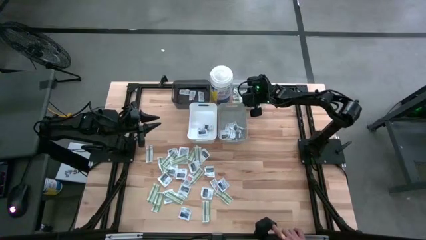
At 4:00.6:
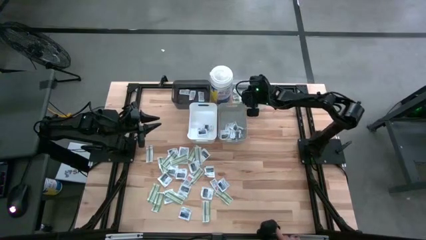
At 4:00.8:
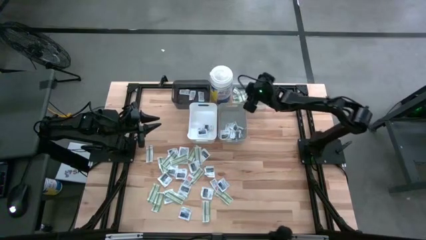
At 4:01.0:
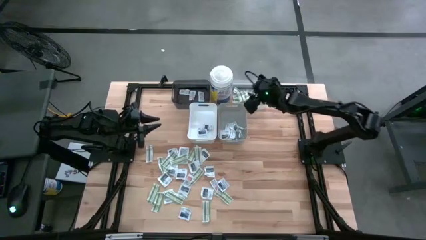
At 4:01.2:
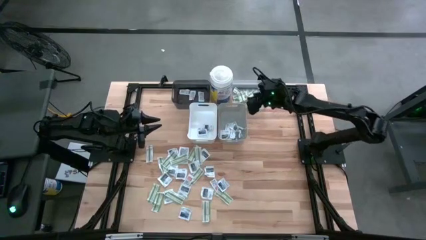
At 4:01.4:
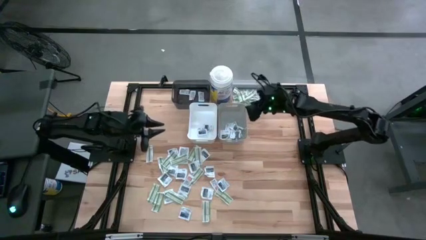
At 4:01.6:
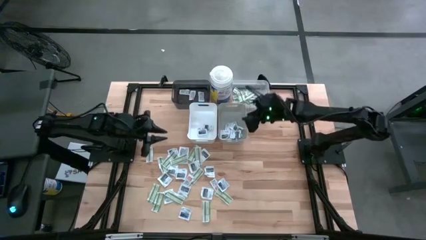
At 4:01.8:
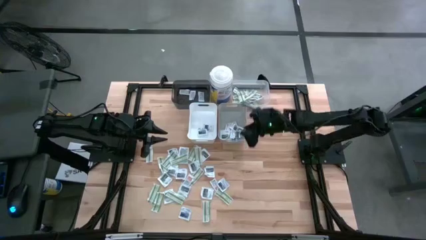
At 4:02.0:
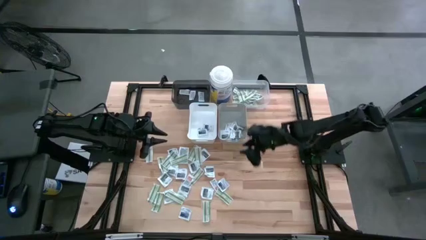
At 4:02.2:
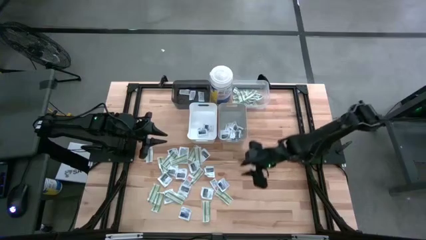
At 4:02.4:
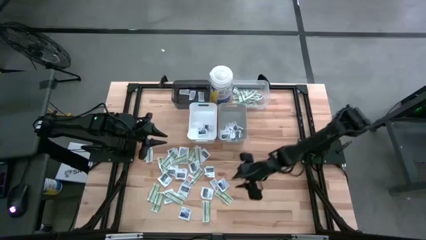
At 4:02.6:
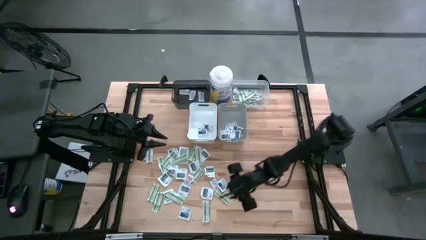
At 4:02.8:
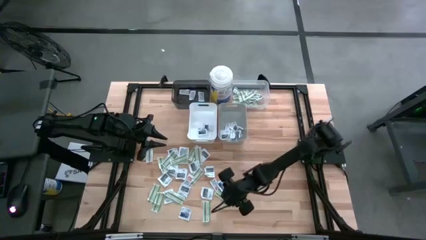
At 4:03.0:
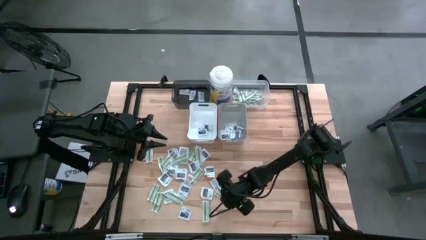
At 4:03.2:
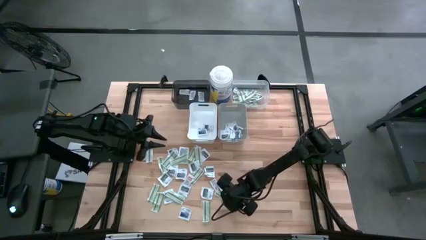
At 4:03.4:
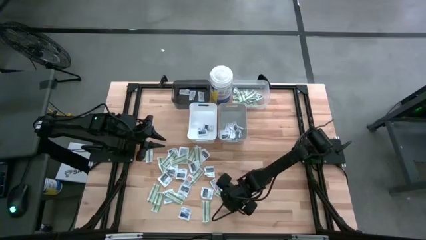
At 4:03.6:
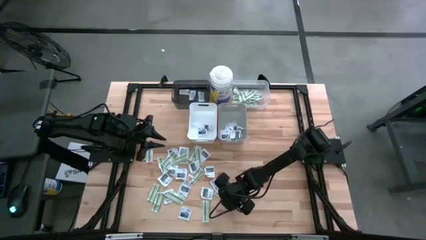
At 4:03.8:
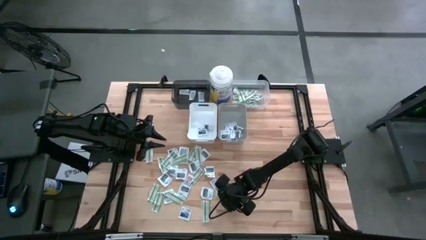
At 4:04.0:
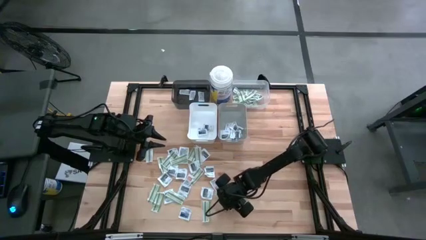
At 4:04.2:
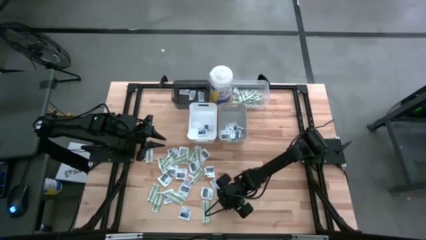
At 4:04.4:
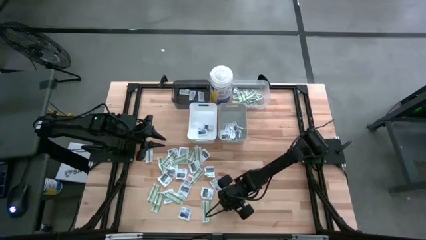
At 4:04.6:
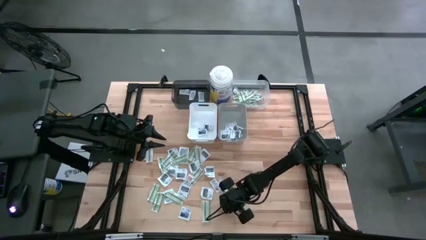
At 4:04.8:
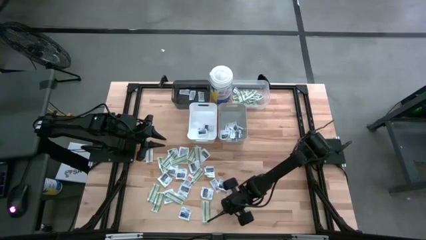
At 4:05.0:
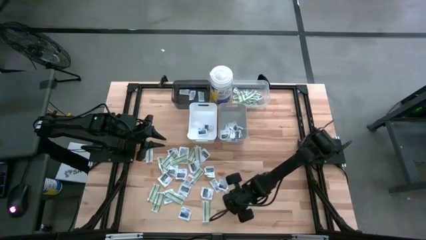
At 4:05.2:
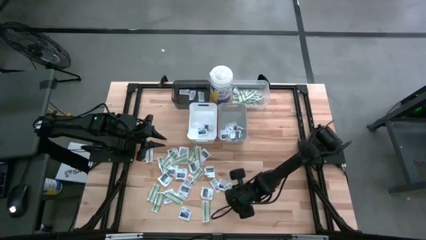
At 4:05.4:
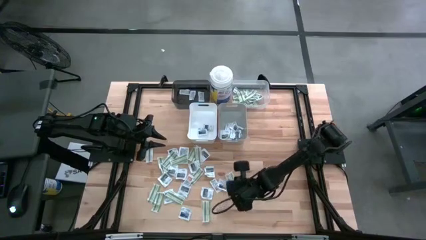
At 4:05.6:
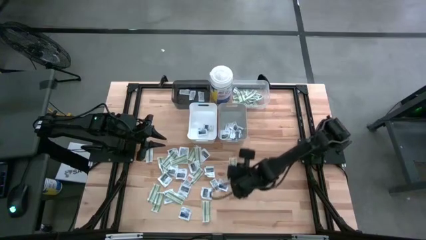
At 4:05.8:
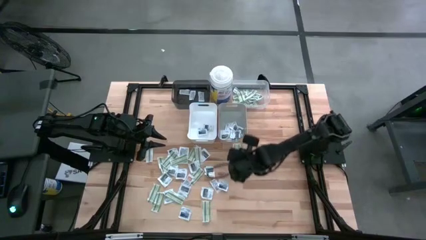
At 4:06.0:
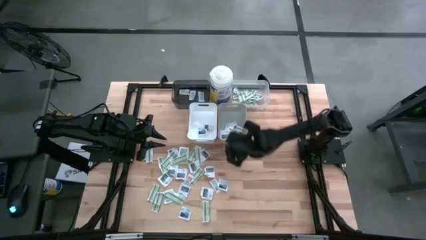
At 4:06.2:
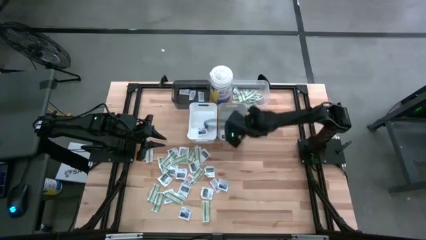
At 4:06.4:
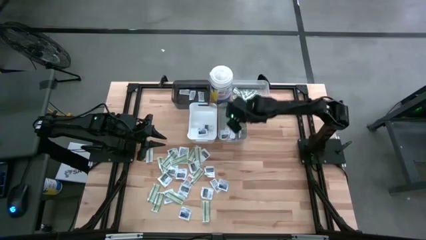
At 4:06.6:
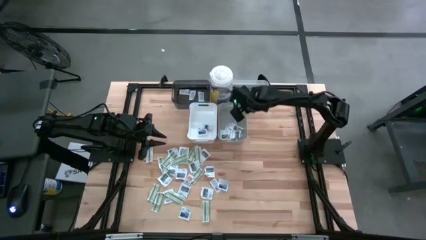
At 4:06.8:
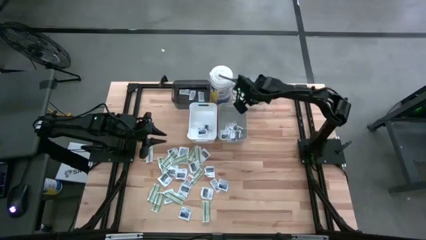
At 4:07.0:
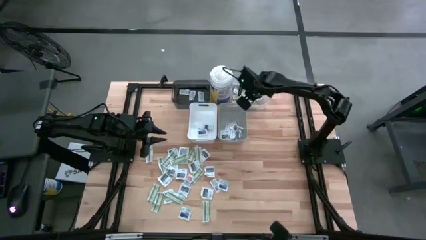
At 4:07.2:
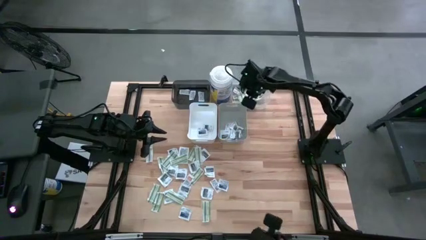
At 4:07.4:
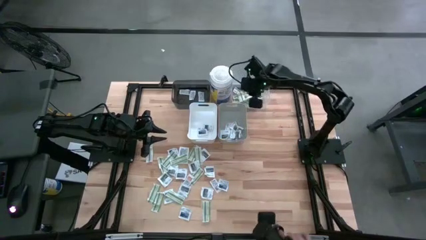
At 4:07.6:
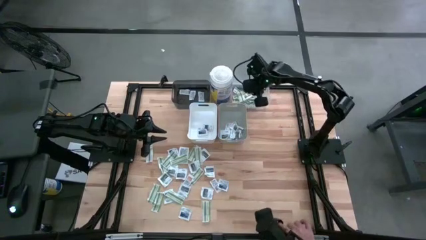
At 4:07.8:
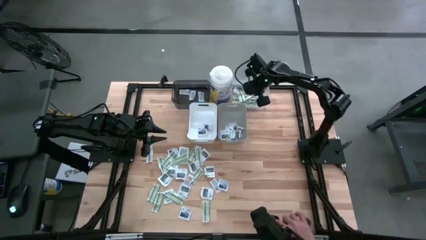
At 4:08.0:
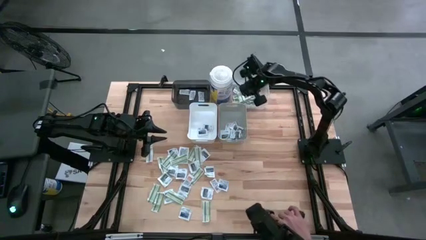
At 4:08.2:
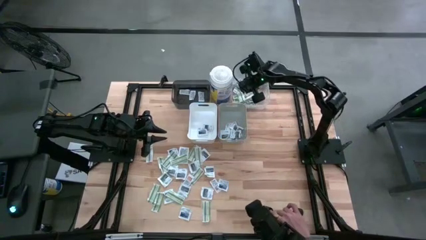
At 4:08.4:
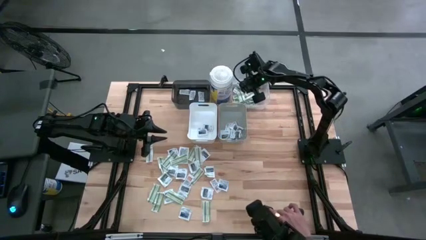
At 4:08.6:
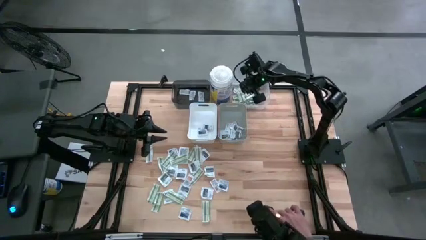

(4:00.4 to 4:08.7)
Task: Pick & Place First Aid Supplies
Put the band aid into the transparent bin

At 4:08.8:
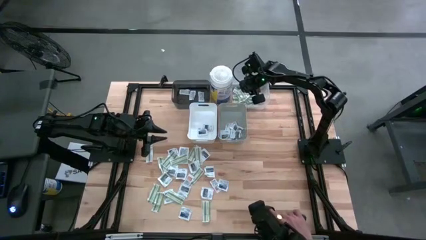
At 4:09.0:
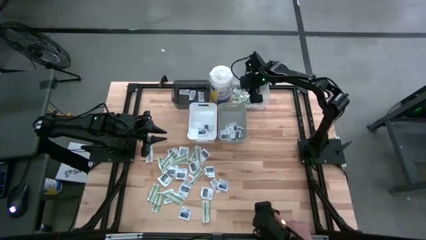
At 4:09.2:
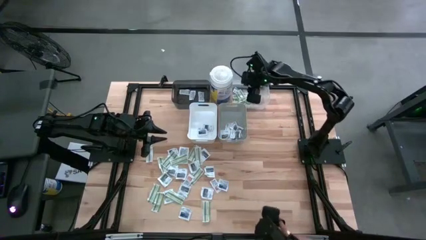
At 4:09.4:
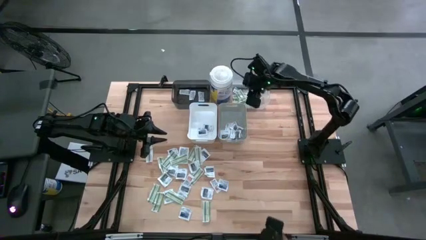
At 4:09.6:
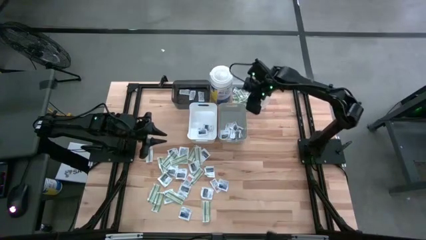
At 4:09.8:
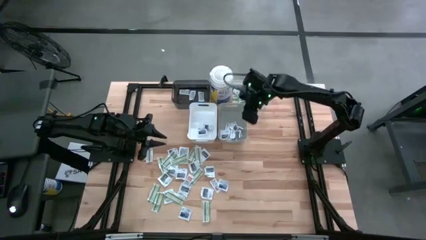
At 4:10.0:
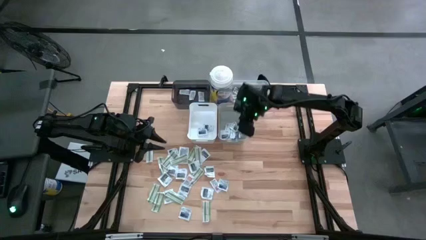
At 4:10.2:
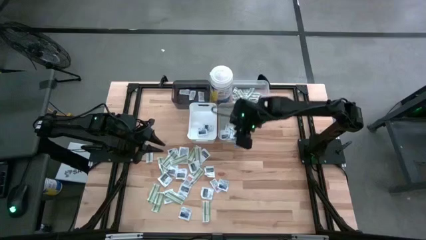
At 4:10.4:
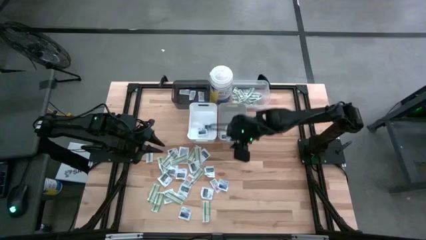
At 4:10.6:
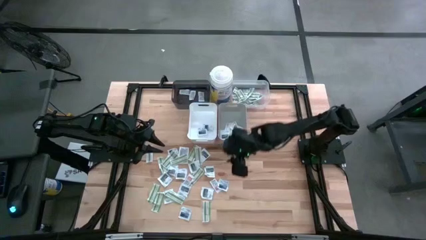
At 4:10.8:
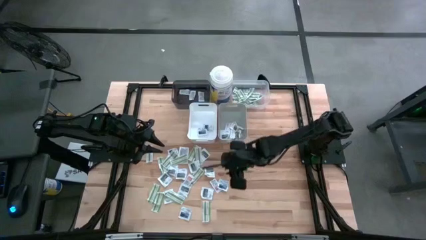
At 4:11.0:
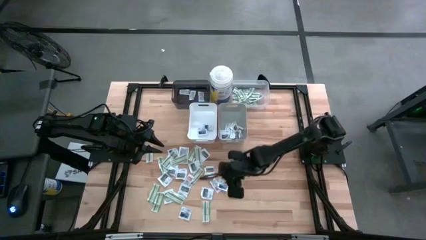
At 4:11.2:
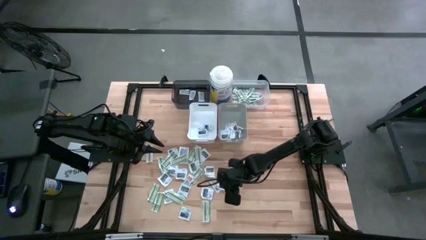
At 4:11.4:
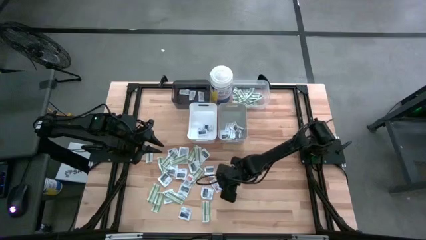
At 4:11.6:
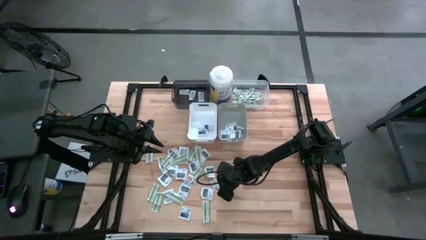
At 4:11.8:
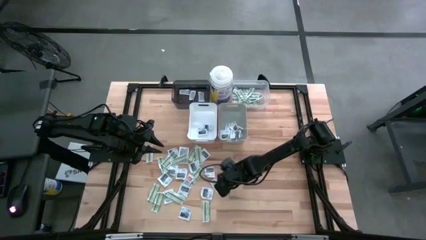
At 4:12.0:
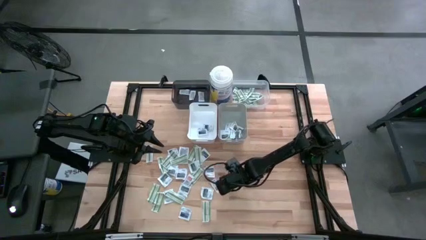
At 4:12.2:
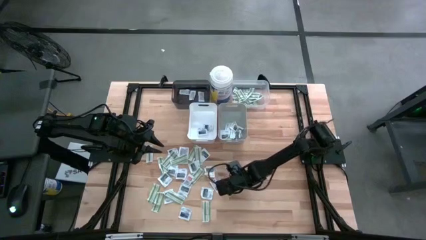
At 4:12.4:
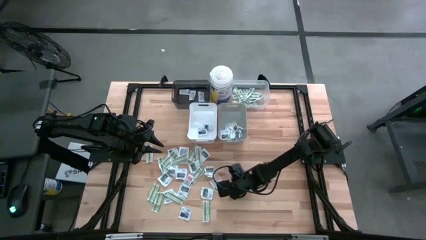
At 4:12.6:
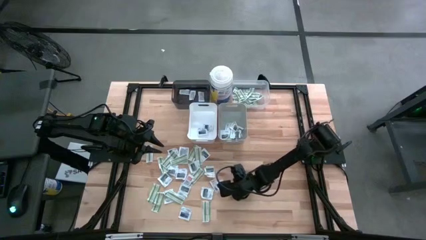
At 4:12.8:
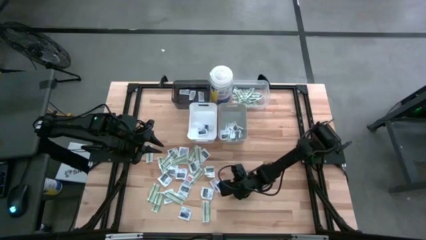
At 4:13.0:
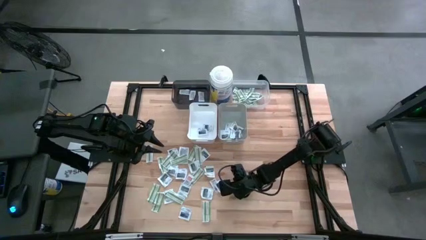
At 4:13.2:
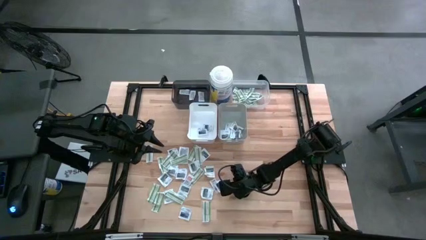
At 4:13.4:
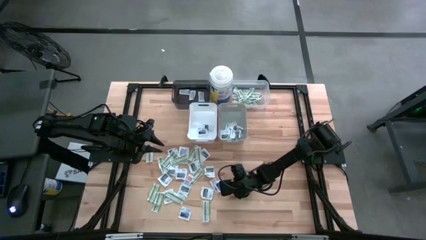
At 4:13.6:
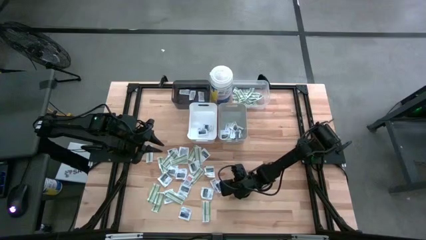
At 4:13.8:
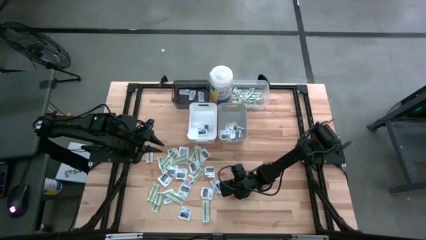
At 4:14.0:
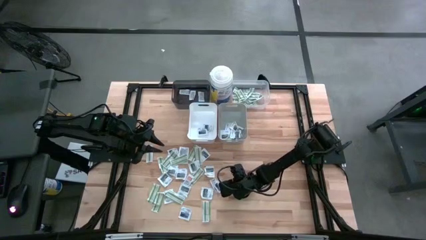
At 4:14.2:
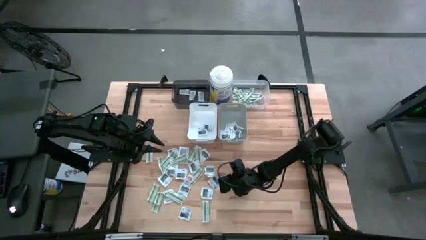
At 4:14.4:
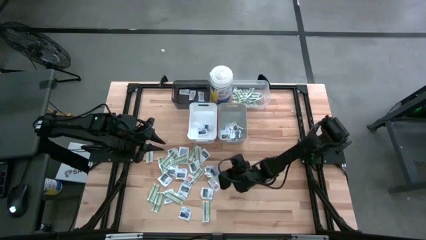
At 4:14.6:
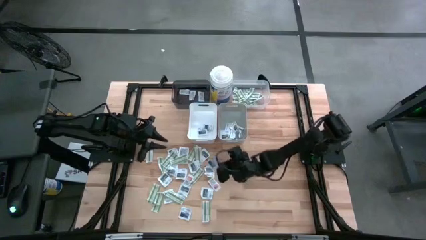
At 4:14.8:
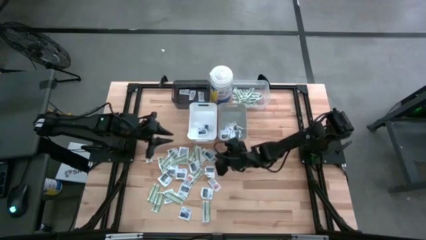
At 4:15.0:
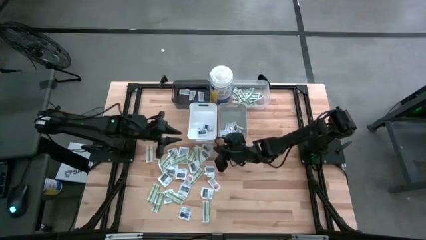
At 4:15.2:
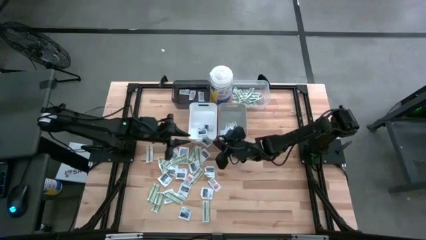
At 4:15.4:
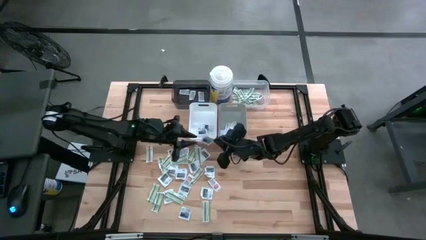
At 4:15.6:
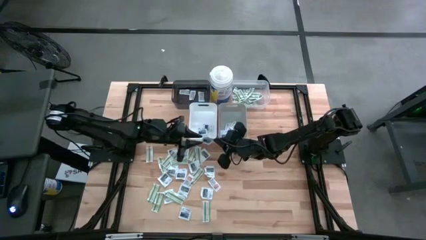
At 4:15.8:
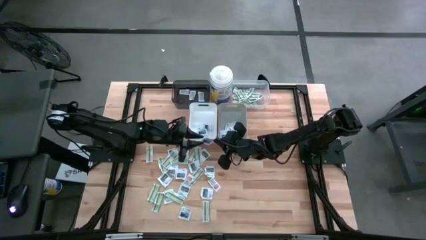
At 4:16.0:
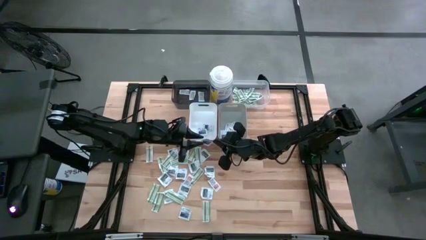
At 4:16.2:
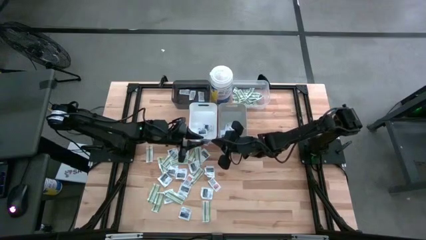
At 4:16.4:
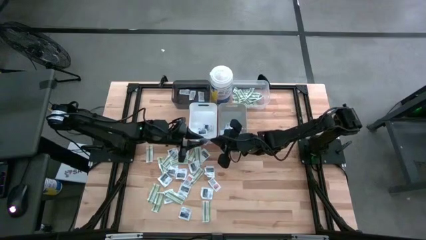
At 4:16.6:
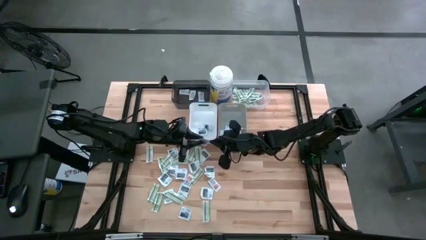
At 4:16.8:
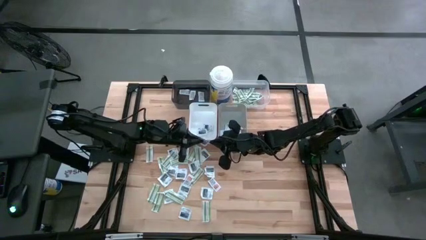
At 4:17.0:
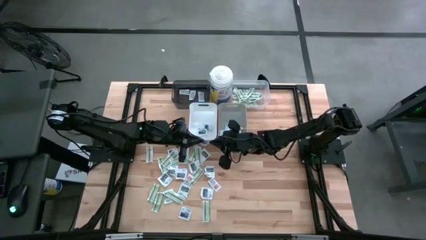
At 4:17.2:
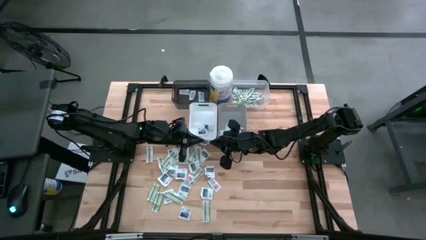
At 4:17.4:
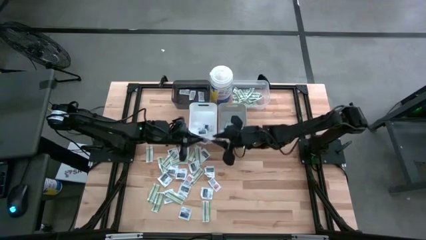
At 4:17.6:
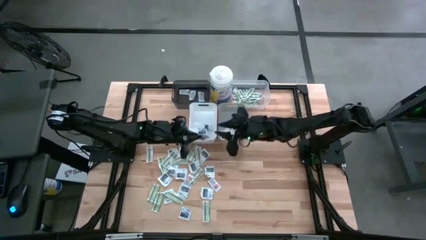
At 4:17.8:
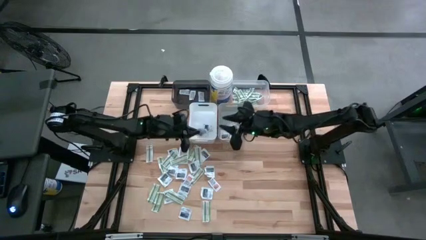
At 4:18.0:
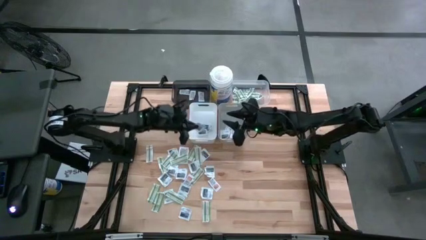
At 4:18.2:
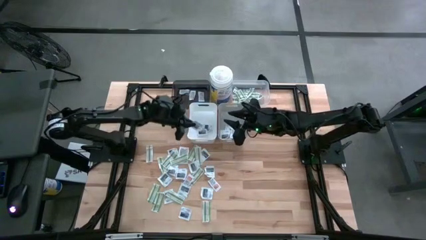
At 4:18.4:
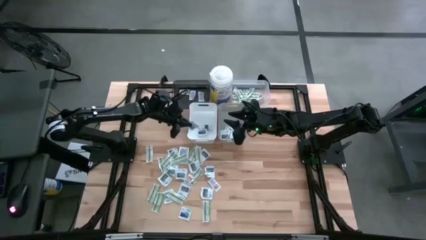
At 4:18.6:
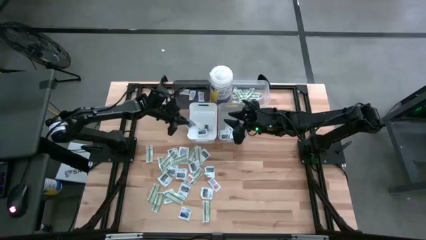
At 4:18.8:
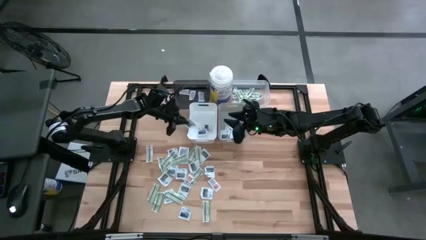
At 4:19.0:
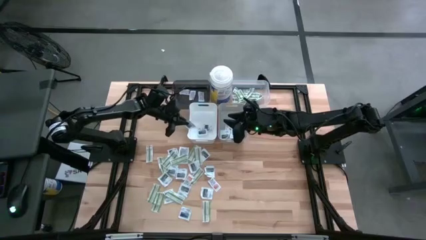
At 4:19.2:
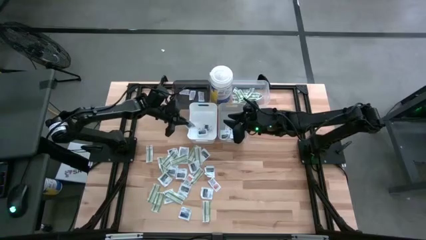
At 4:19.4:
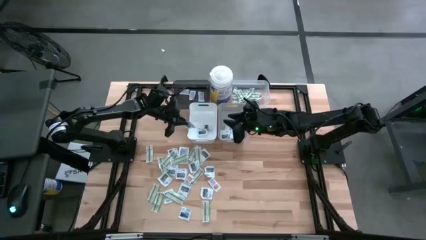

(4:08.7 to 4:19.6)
Put the alcohol wipe into the white bin
